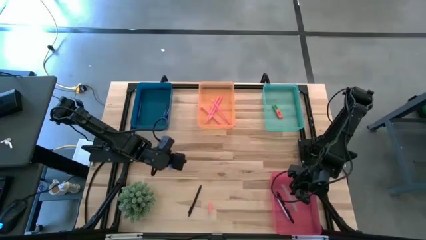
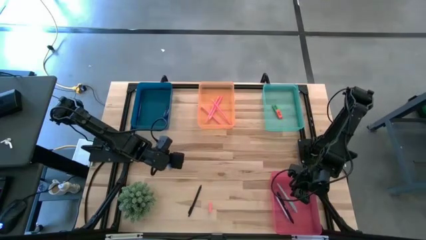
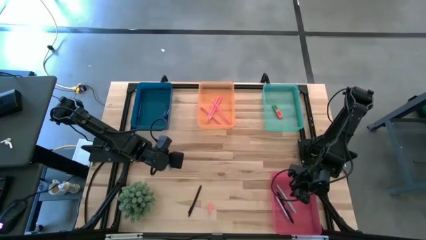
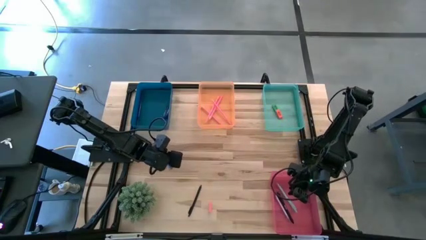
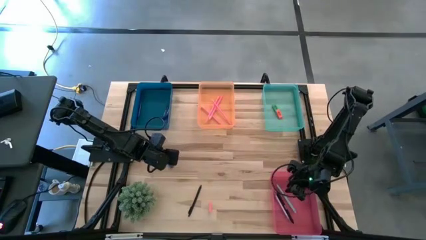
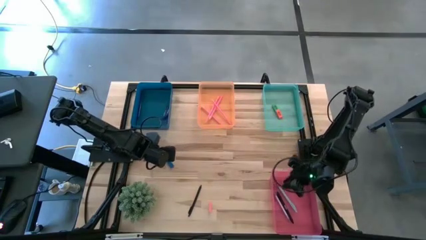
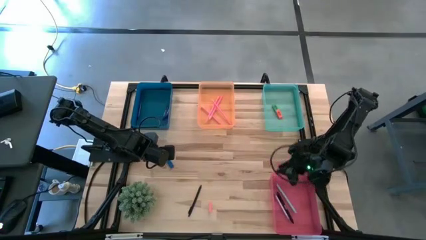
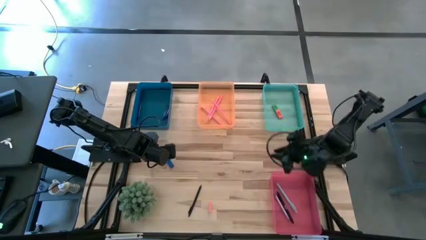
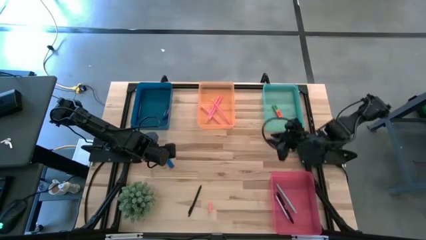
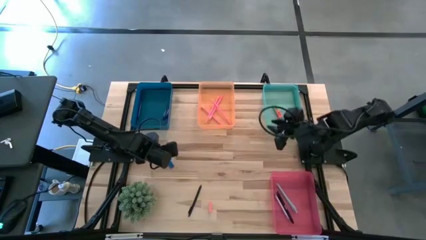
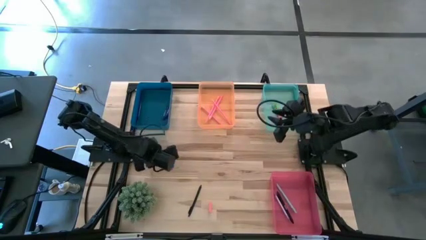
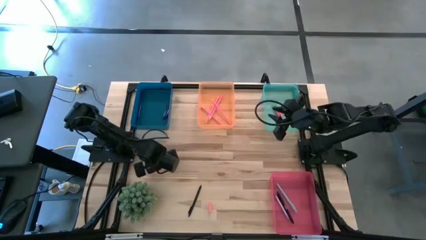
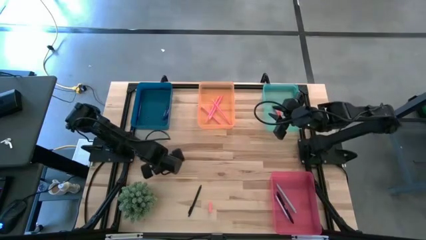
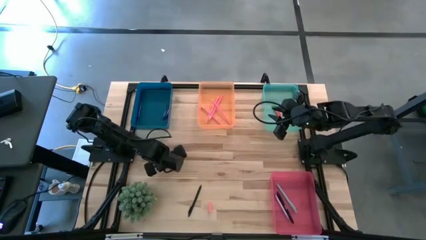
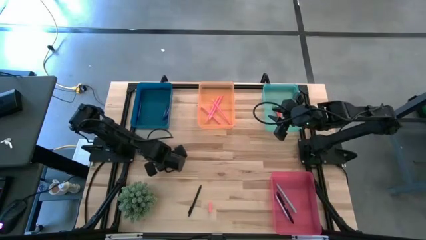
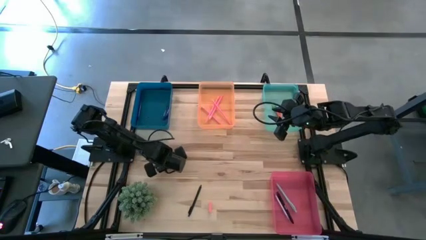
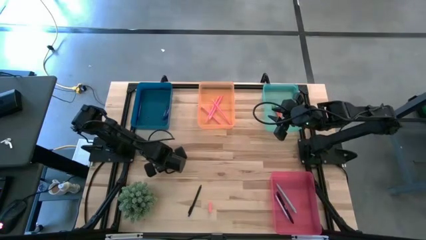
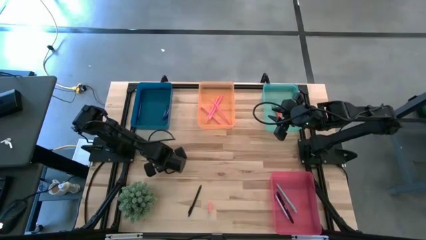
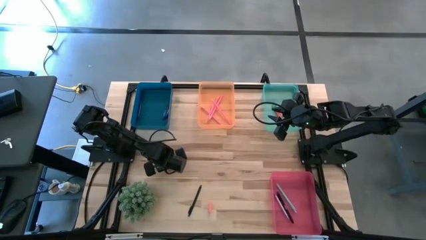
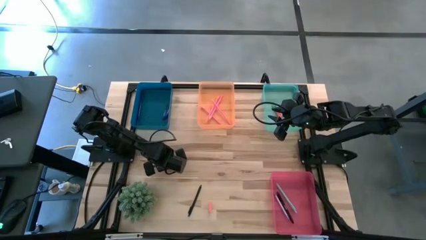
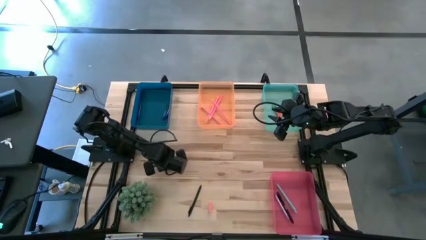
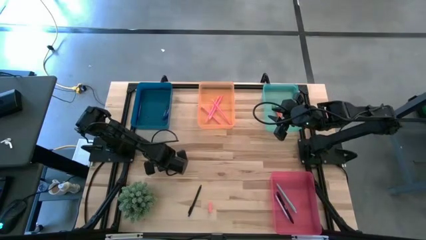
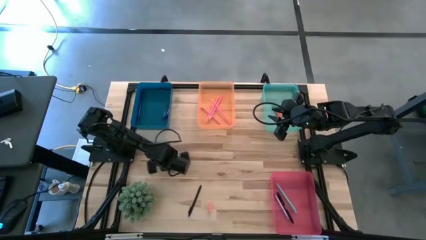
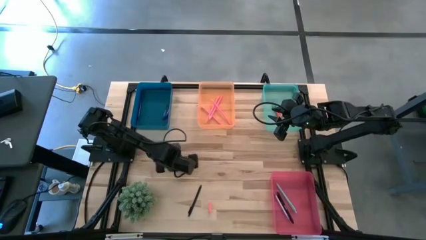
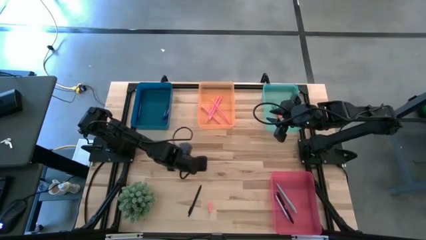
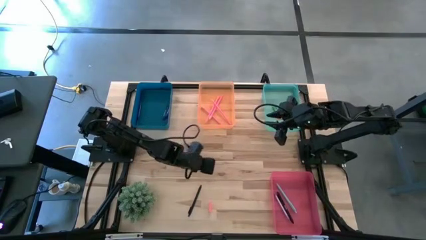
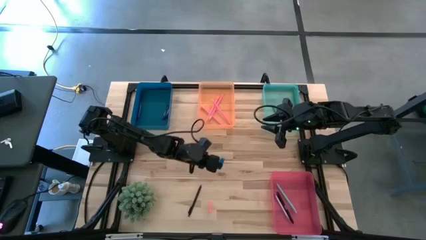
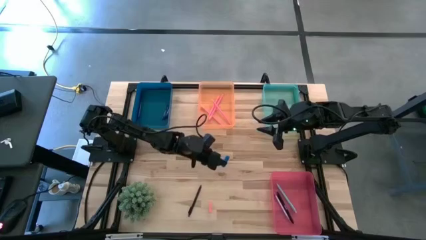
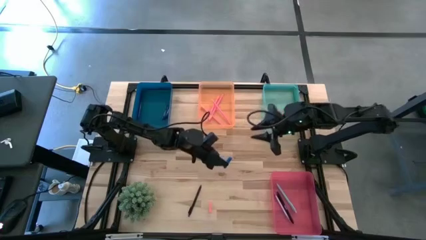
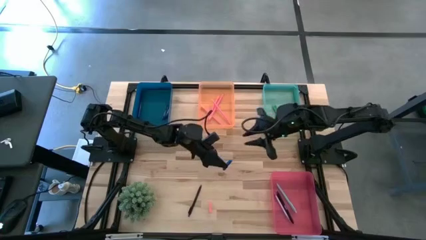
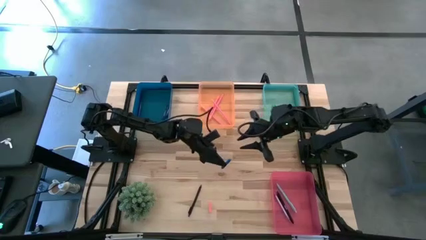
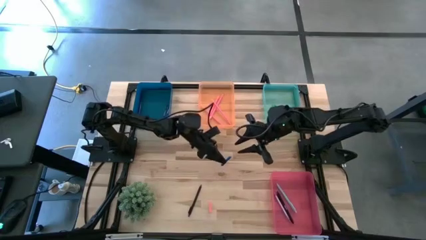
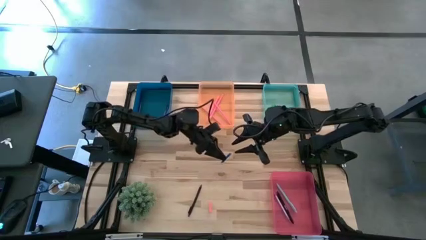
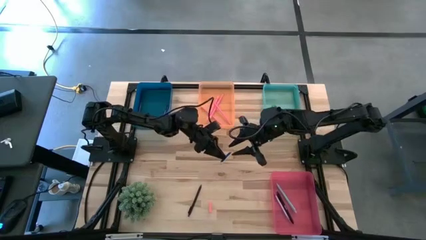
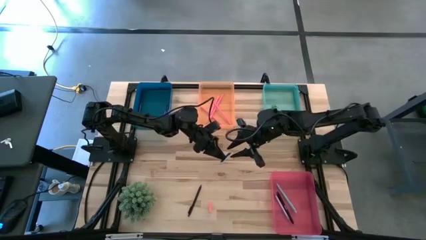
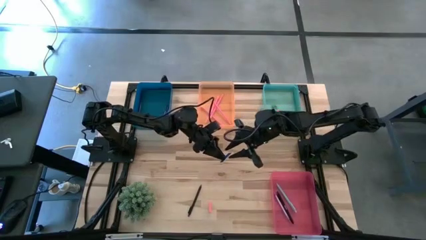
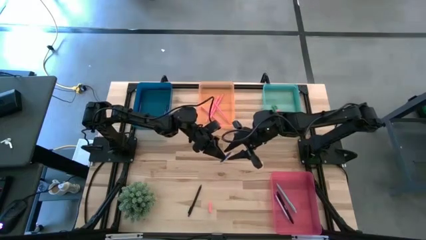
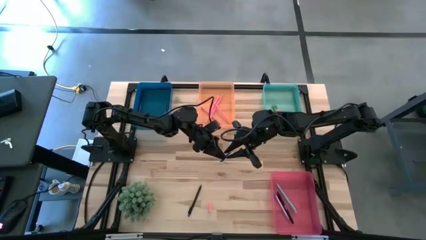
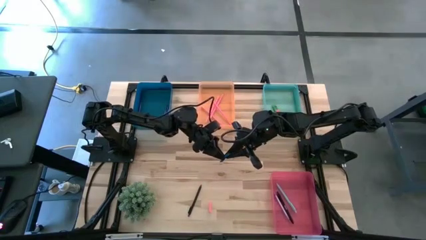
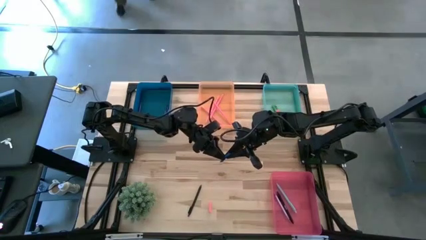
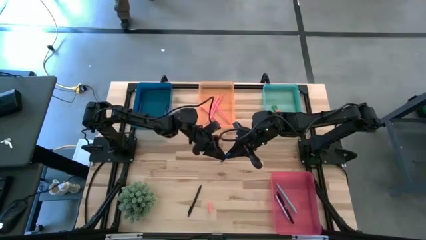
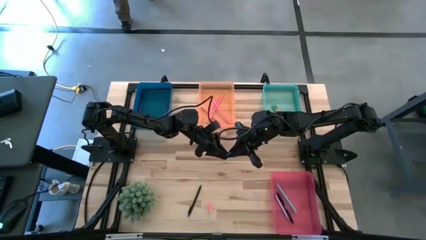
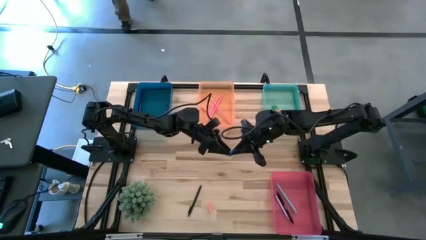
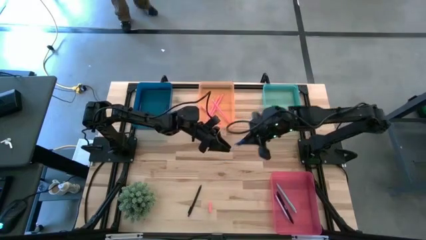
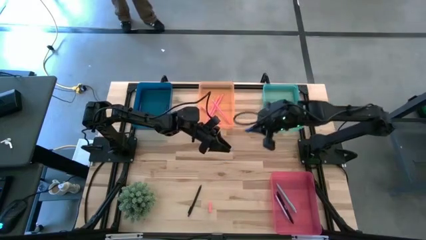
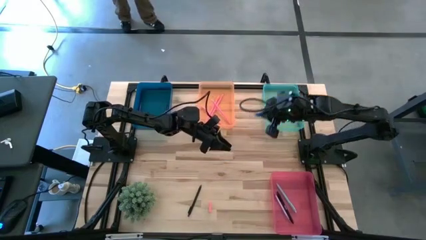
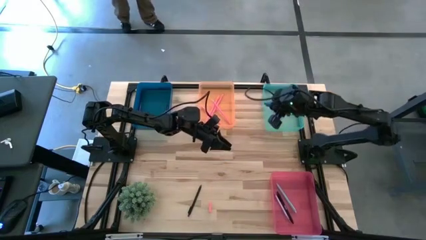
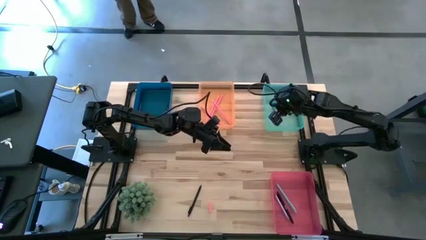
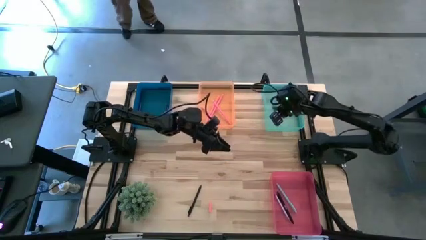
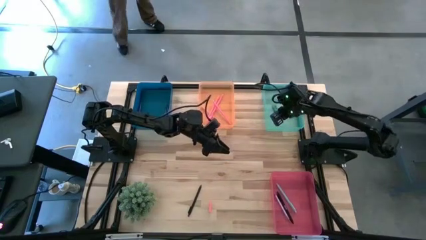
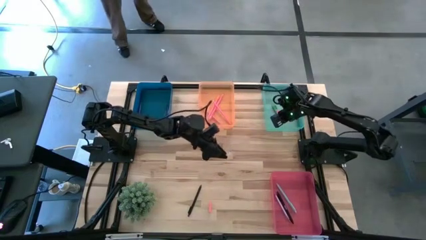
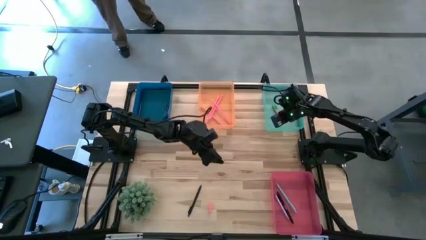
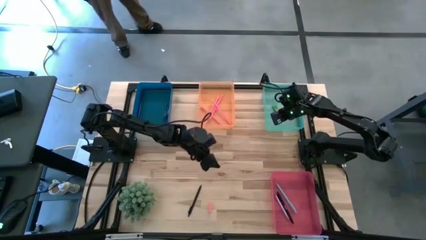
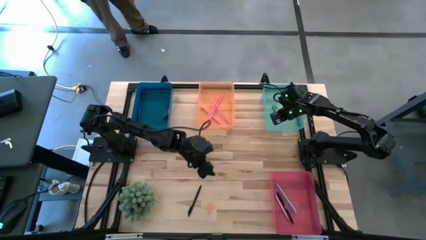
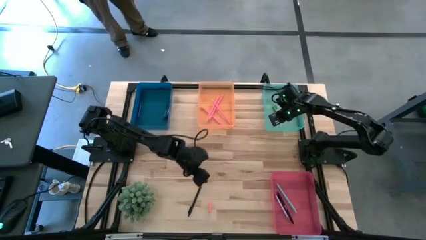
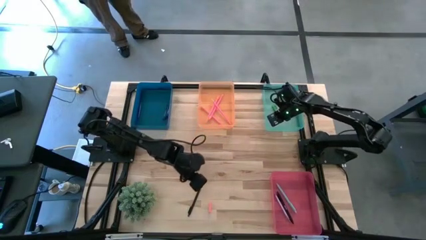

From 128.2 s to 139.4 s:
Task: Sort crayons/erasers/pens/pencils in bins
Put the blue eraser into the green bin

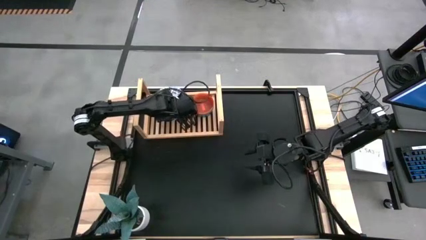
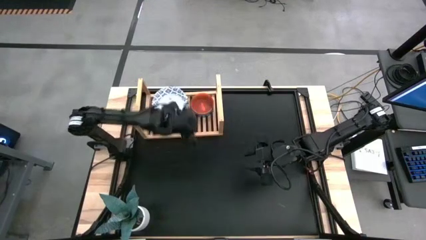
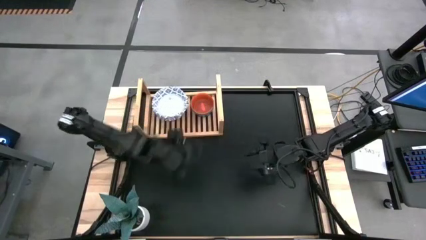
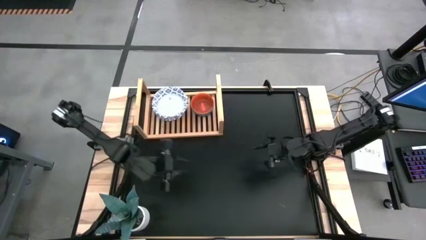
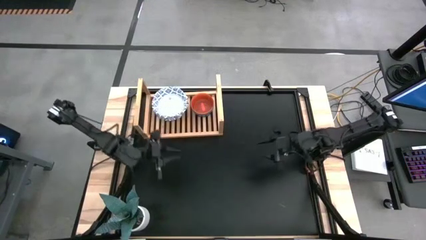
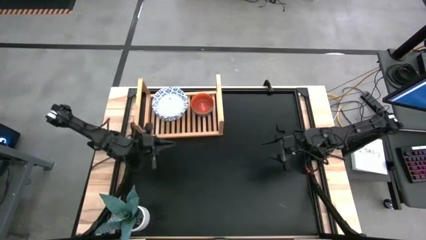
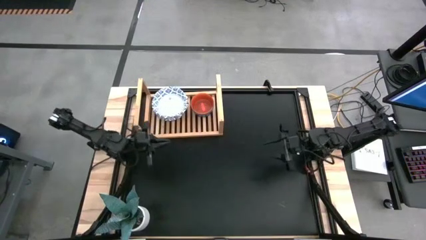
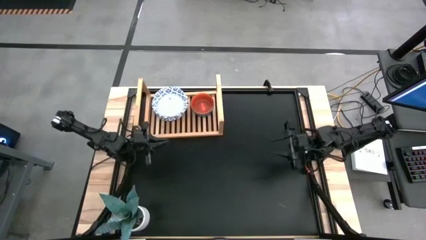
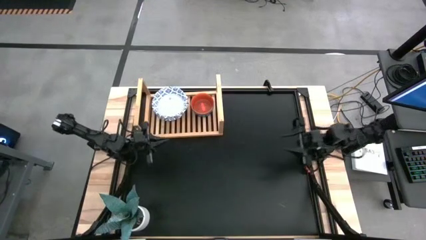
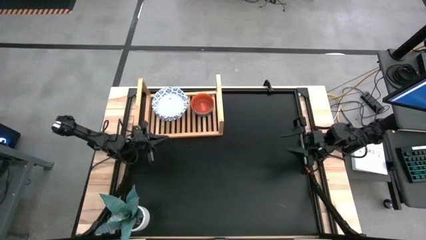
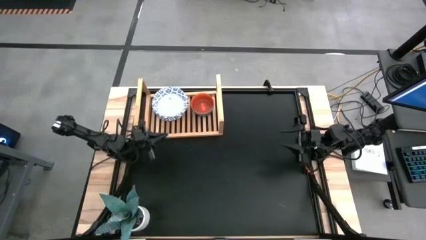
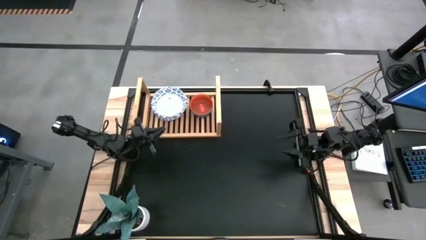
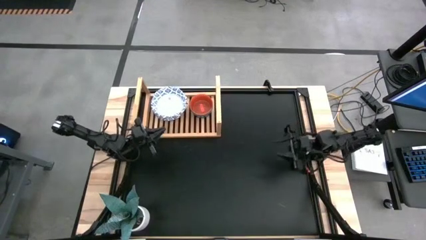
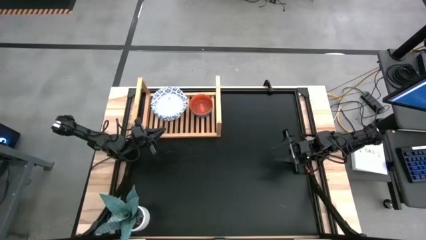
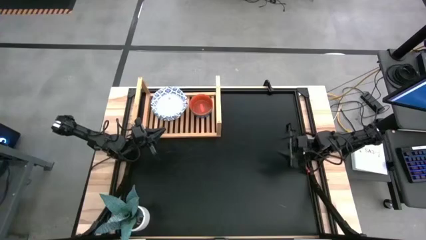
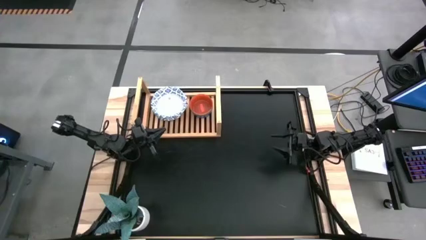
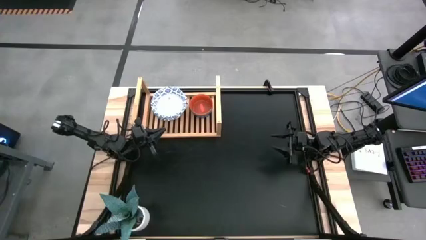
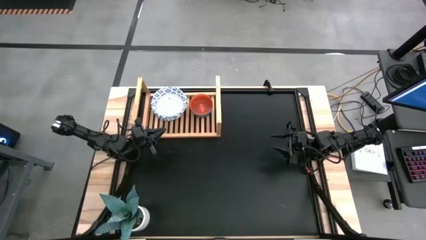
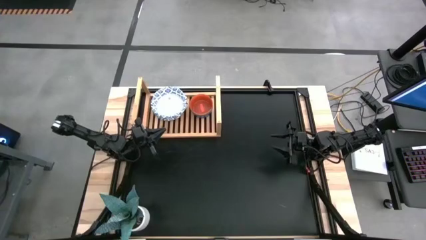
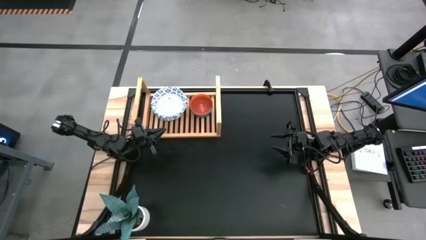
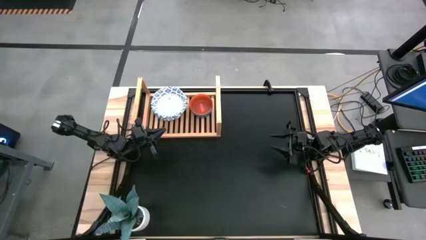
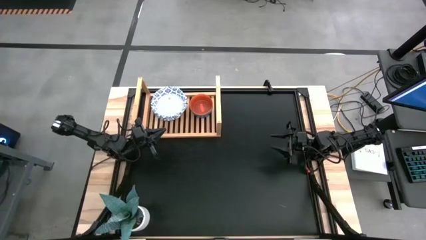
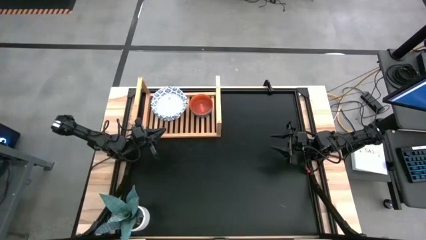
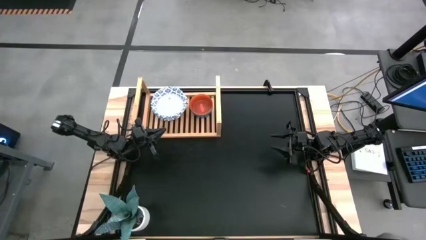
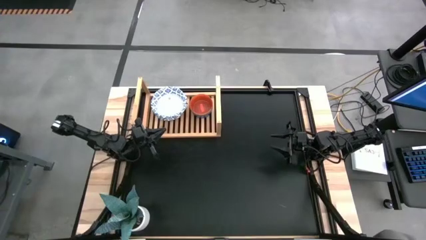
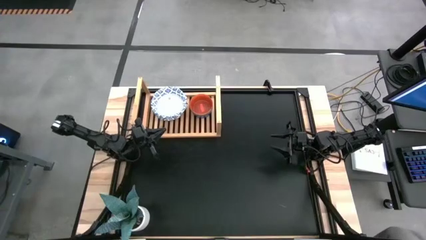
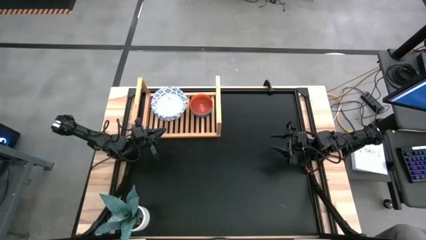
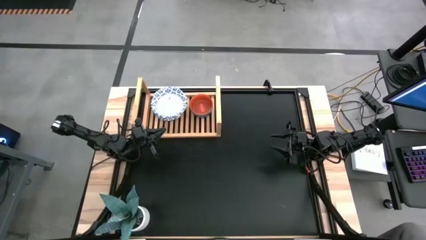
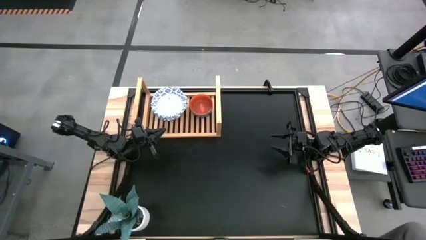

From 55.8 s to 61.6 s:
Task: Place and stack bowls onto a shelf
Return to Home Position
